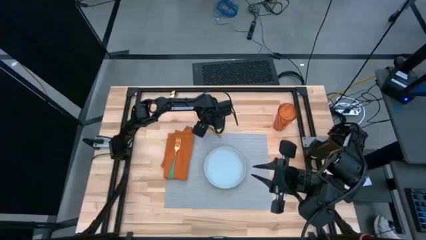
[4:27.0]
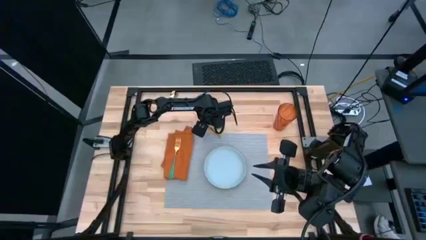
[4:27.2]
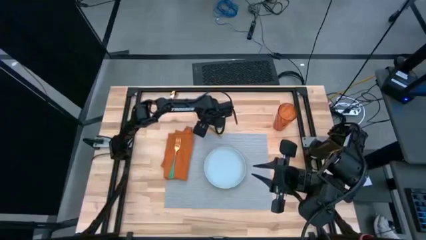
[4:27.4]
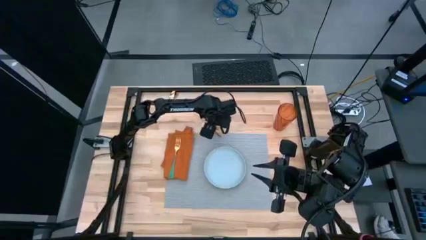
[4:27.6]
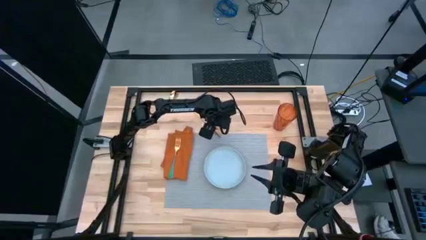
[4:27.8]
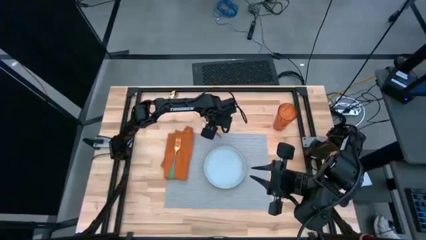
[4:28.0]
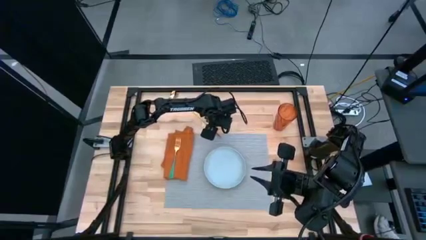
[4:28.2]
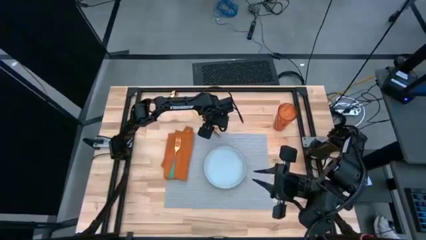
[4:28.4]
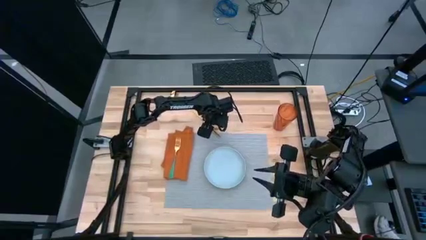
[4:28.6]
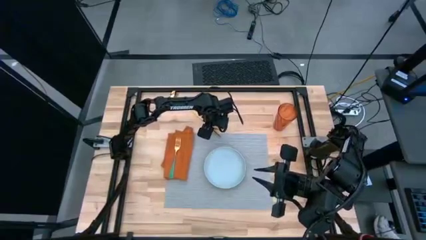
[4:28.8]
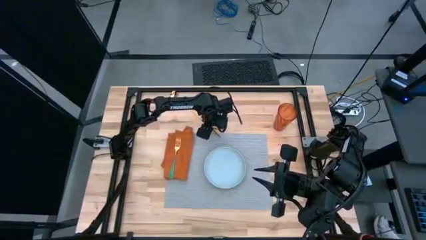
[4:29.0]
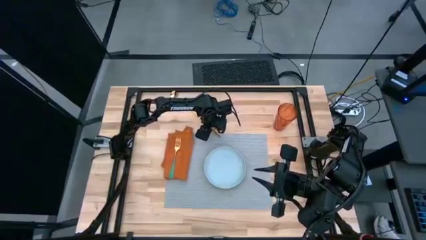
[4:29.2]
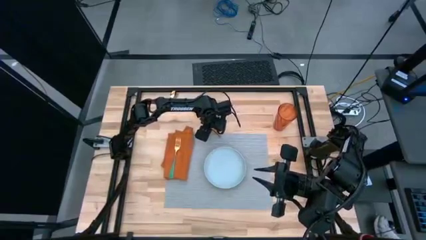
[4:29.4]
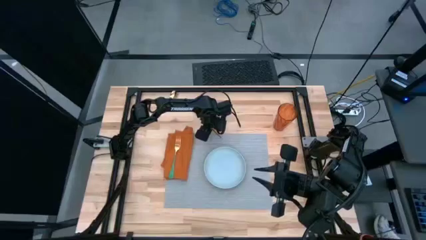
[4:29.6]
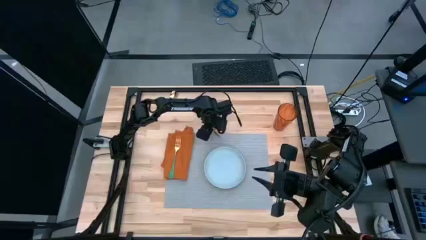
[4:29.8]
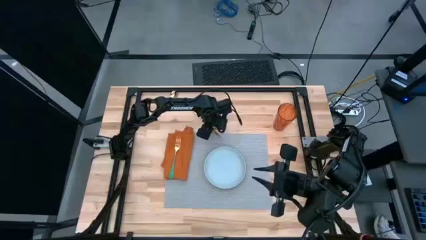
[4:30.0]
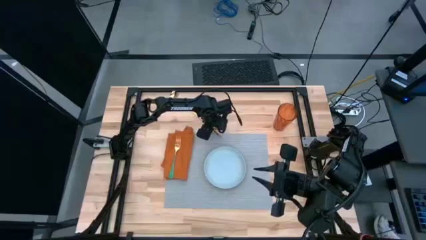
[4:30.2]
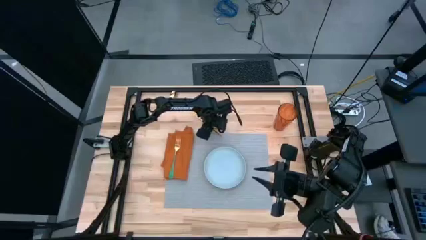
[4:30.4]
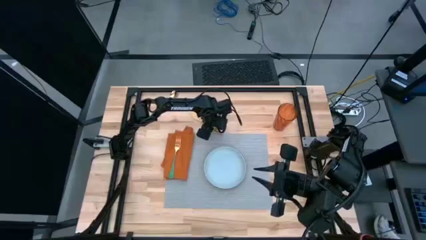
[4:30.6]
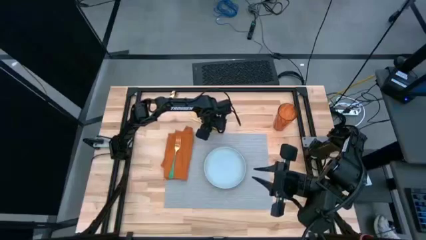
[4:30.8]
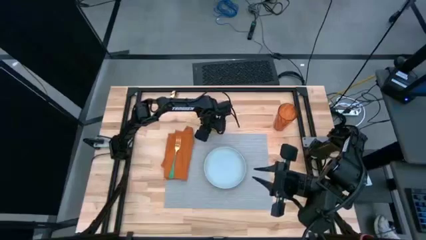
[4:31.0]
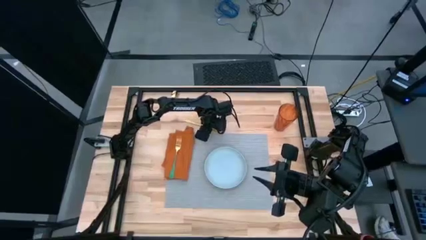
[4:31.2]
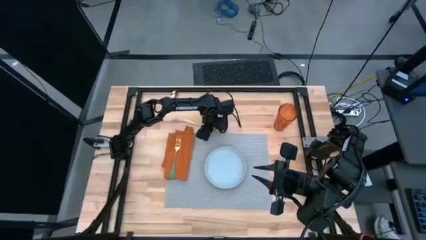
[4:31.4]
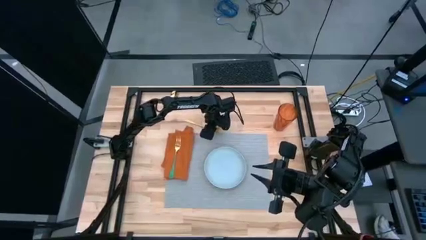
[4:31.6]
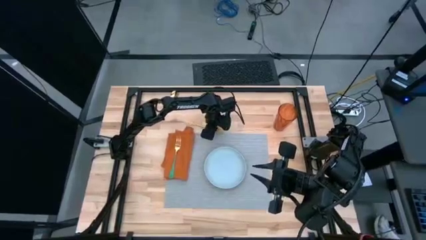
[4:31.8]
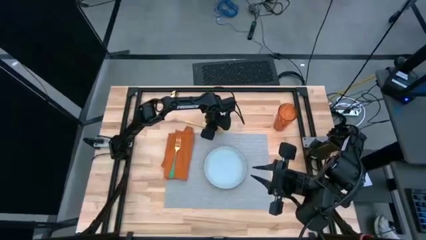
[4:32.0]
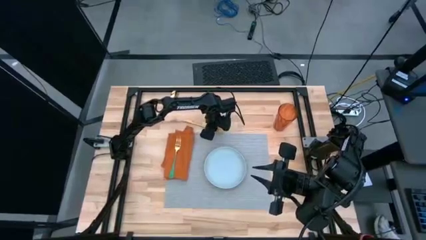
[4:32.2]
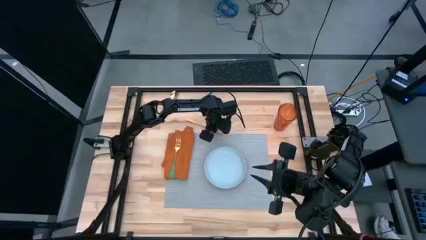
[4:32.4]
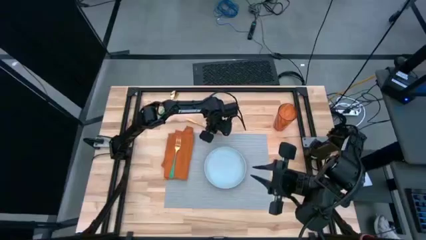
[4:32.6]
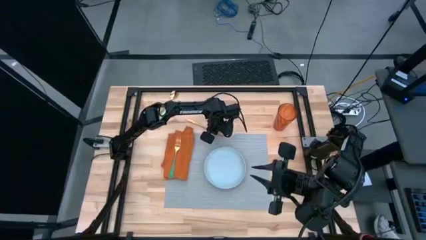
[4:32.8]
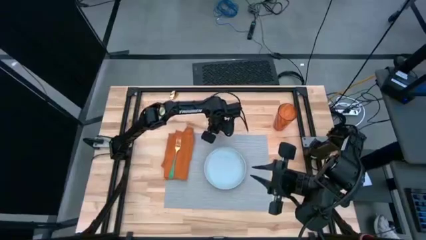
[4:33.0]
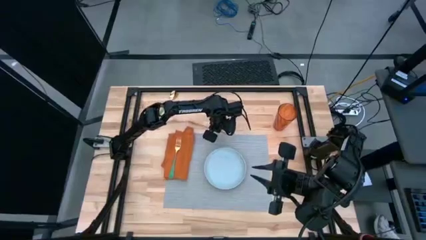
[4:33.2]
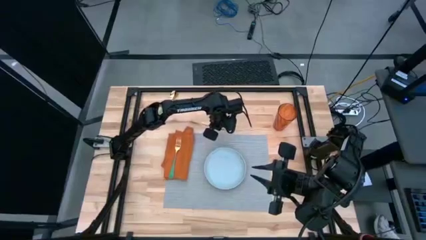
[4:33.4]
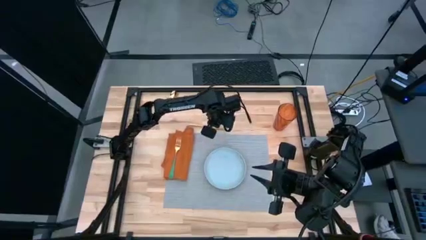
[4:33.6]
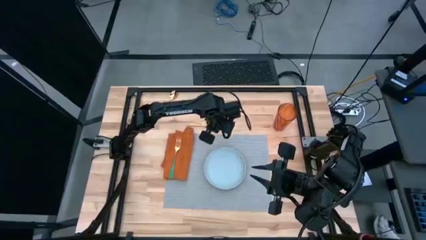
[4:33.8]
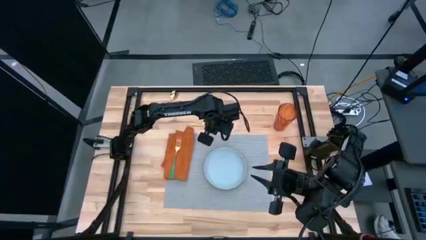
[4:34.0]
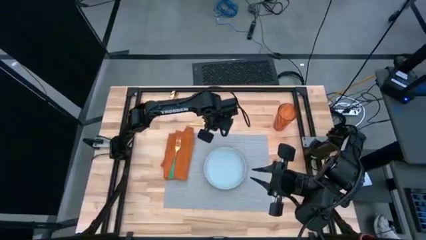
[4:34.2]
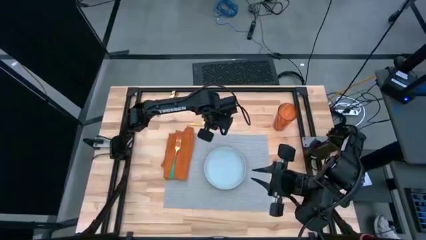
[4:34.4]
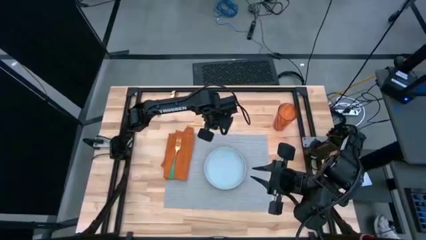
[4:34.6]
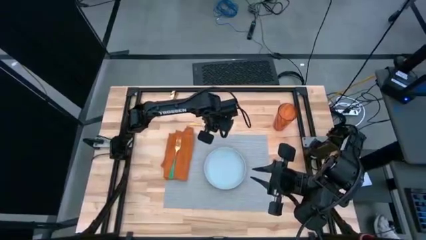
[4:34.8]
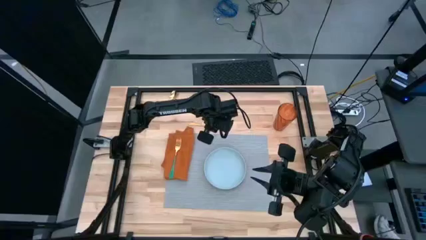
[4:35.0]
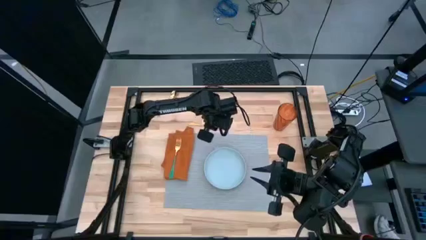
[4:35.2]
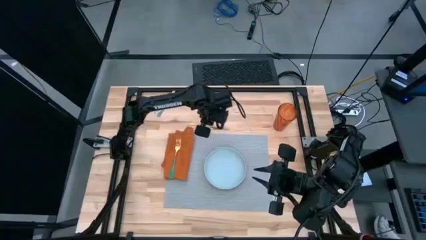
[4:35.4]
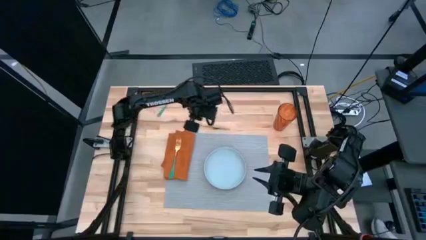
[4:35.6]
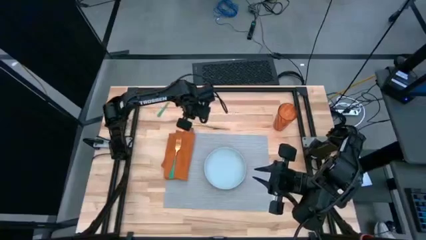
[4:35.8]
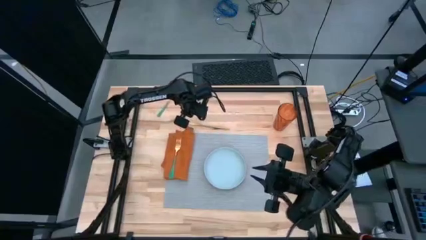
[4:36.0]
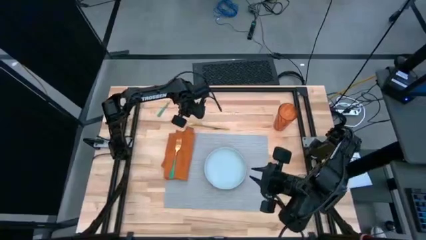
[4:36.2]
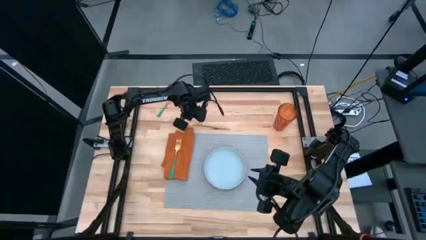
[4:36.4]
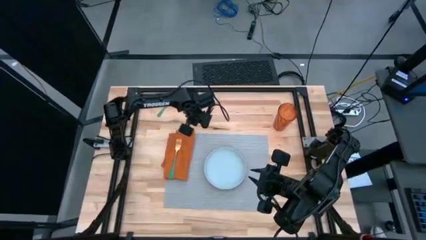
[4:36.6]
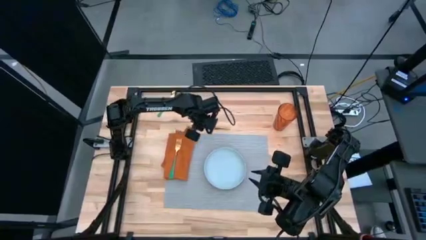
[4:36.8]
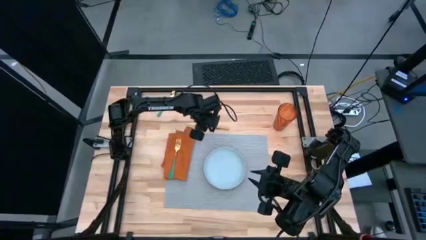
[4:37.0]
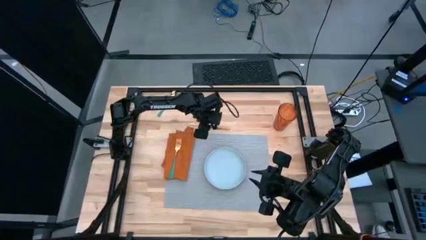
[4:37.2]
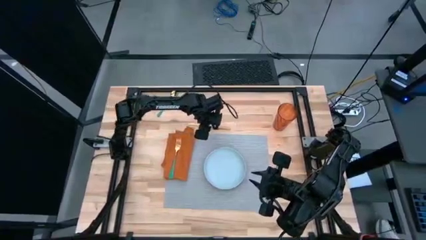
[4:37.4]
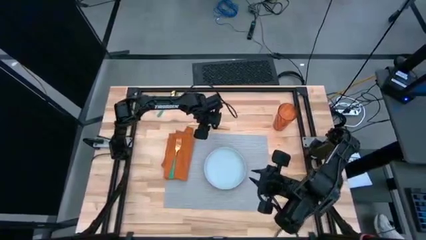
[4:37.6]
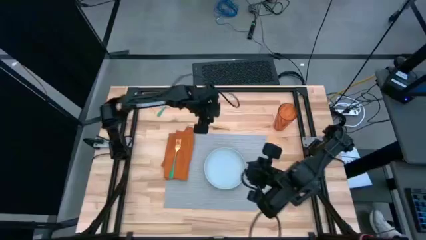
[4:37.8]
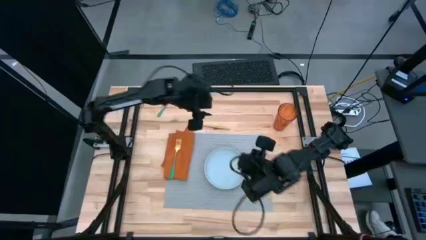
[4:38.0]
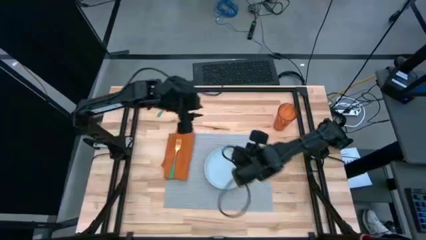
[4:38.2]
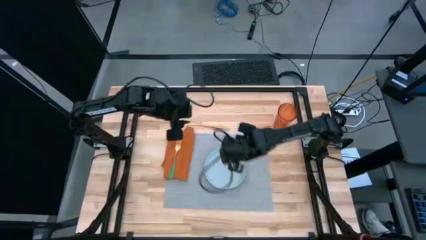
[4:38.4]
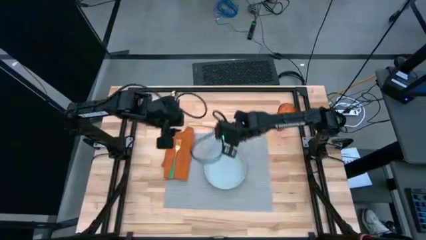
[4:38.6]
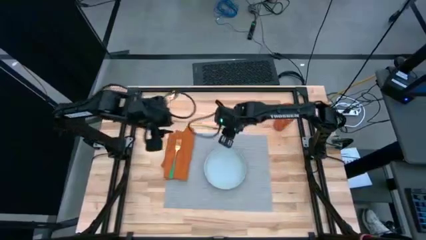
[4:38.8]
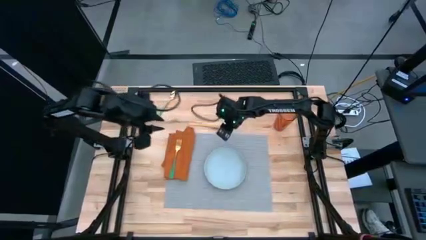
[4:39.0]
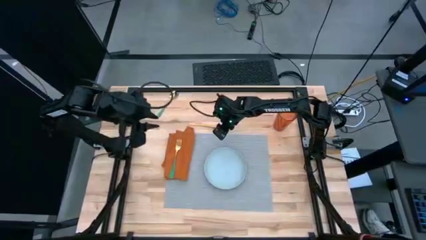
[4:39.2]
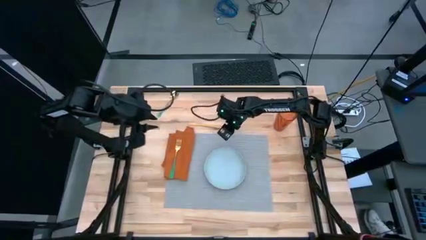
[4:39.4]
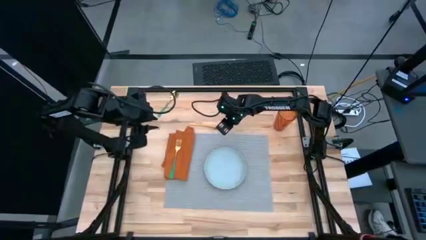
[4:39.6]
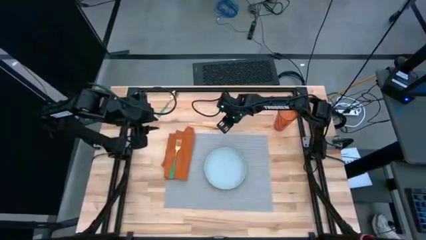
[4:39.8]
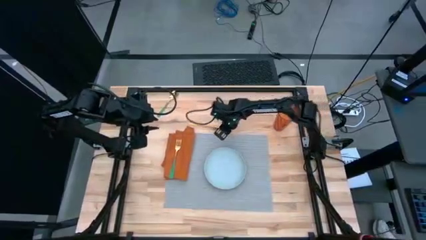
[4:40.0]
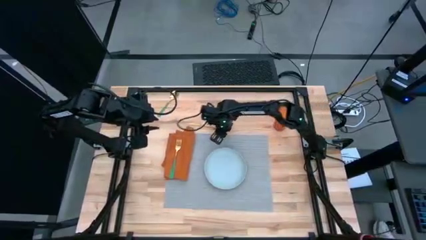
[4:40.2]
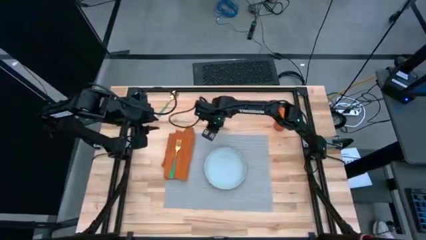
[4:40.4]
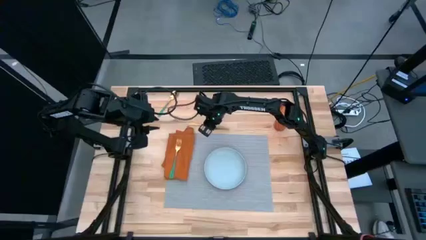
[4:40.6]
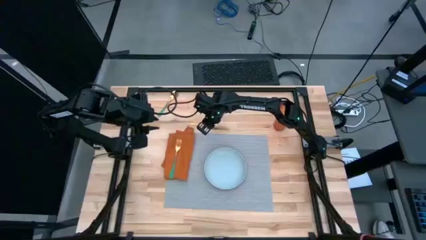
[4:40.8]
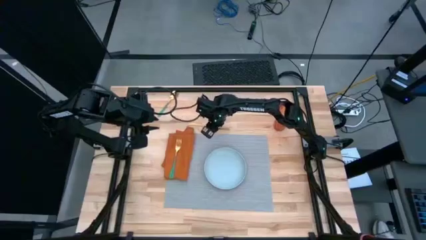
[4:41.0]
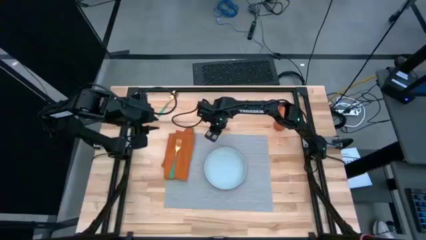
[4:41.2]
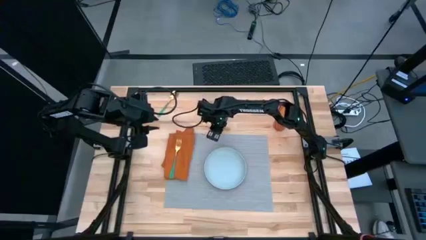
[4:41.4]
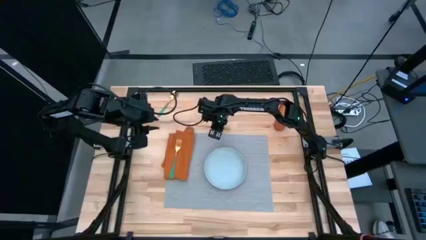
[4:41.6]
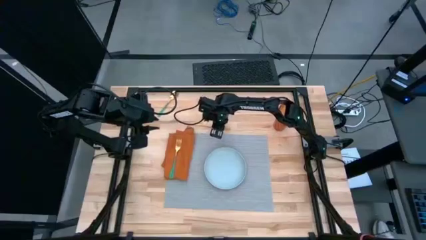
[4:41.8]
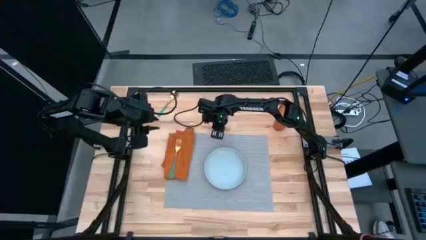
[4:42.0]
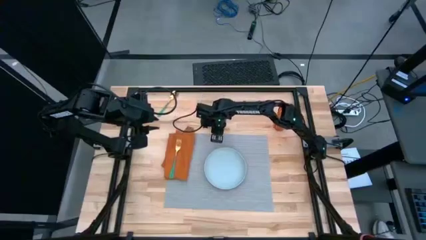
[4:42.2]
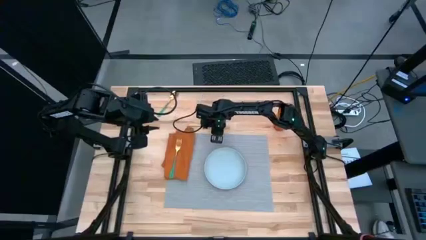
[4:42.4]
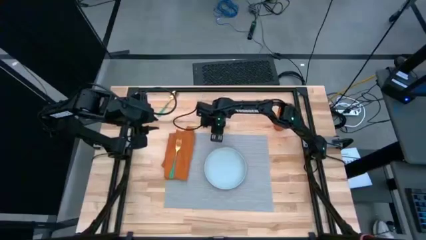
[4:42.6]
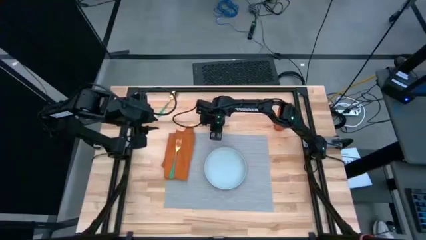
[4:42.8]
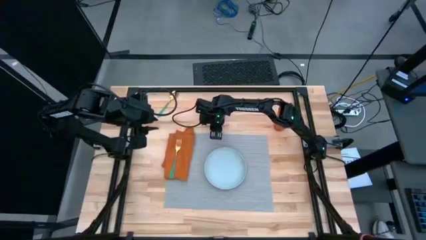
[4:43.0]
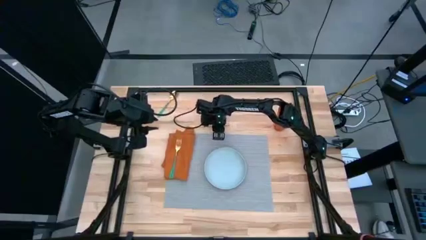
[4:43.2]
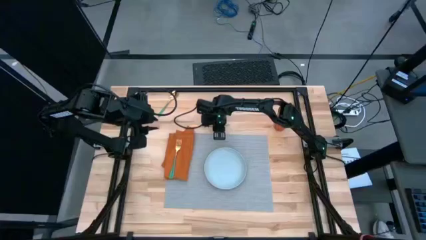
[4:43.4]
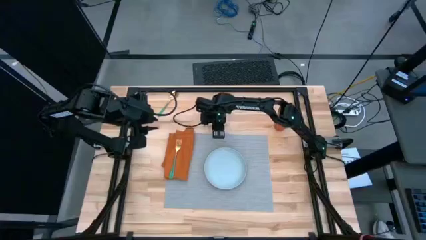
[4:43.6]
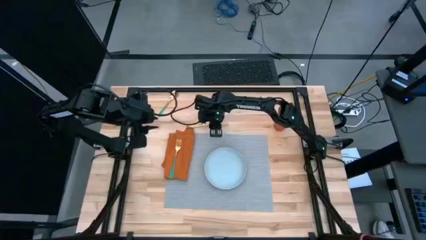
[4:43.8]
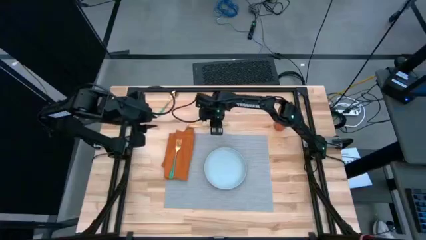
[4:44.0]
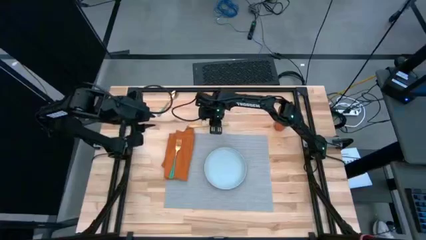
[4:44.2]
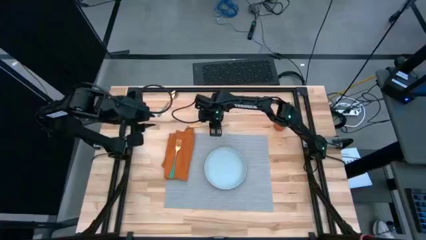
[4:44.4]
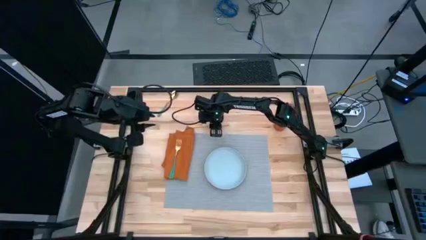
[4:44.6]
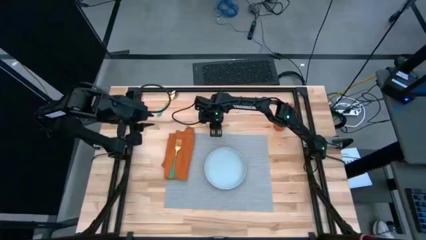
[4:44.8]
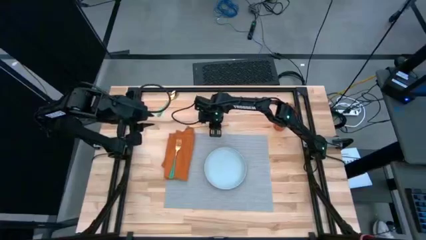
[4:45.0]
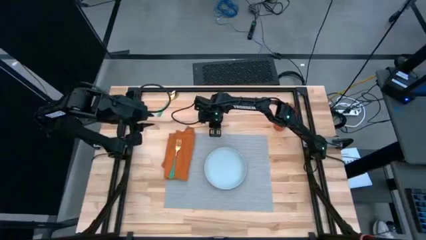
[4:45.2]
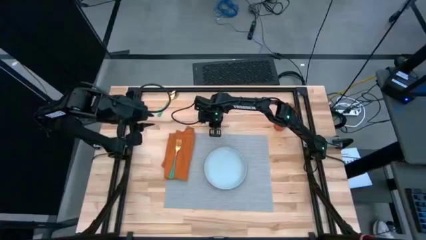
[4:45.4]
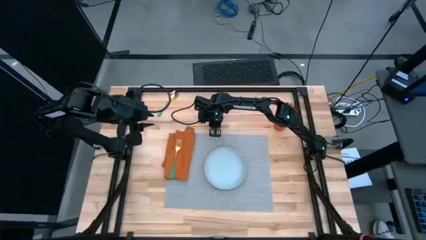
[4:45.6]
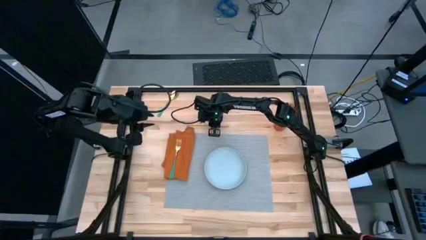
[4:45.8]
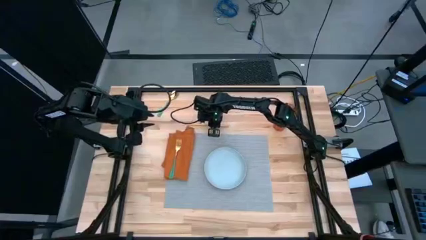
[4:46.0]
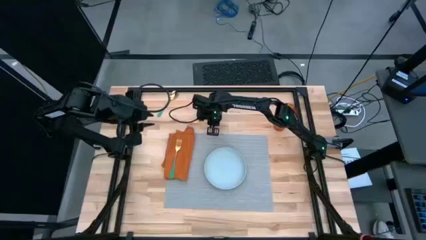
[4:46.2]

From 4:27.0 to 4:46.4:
Task: Set table place
Put the gold table knife on the gray table mat to the right of the blue plate
